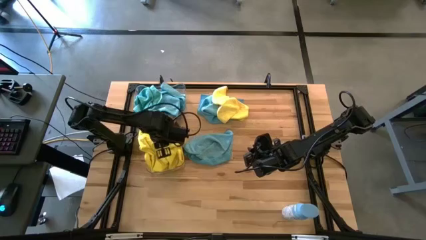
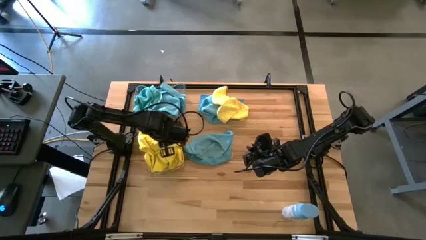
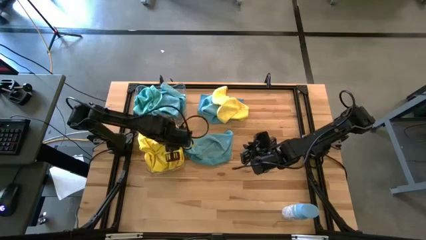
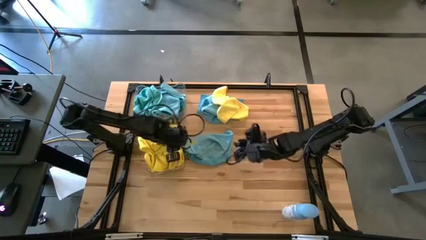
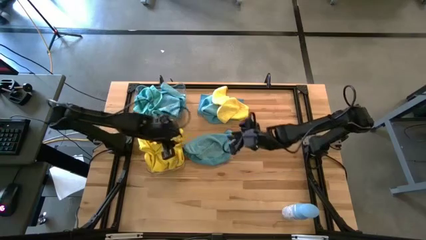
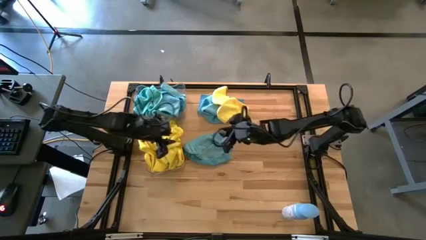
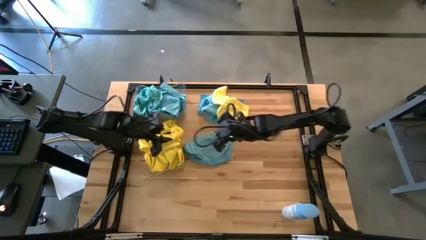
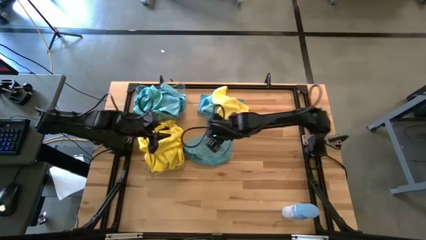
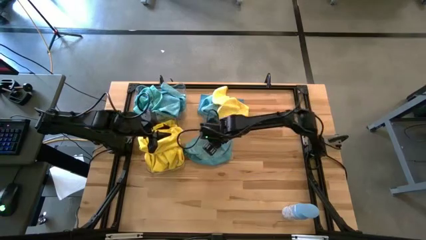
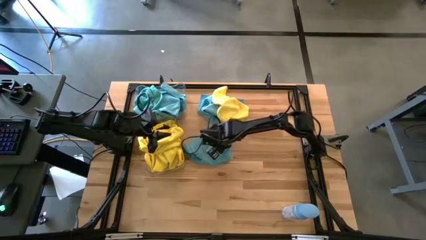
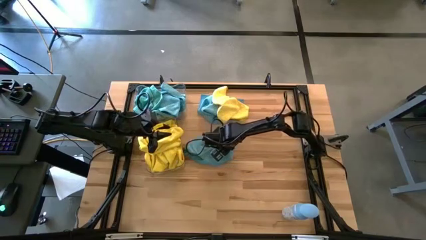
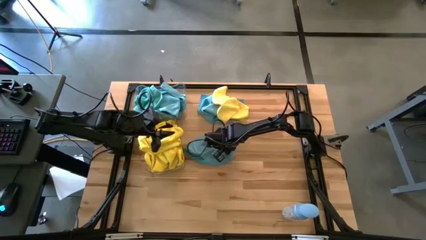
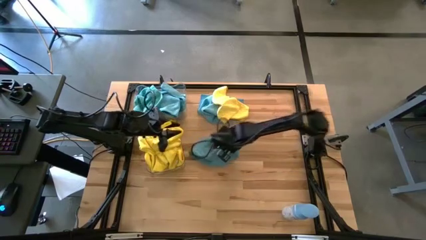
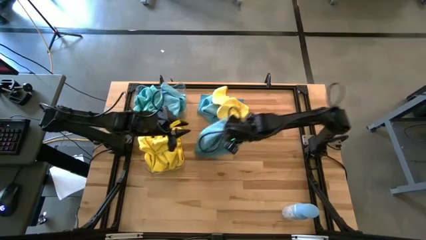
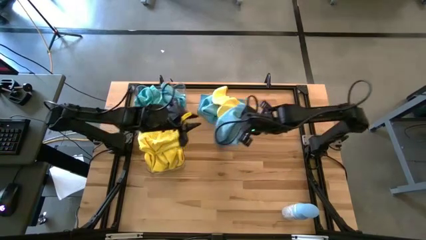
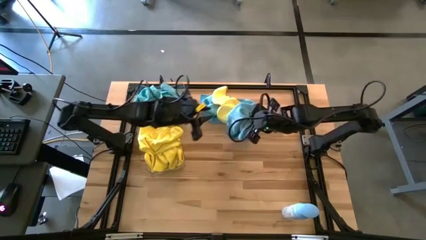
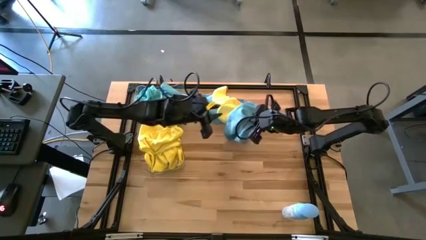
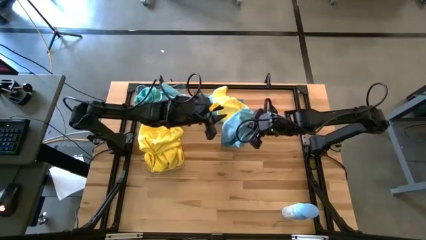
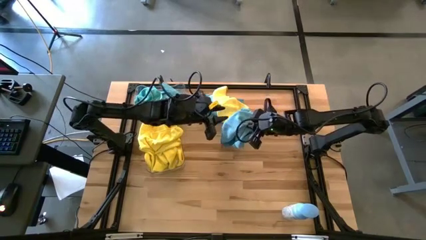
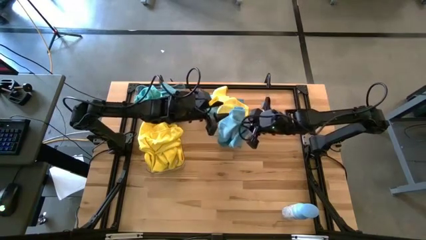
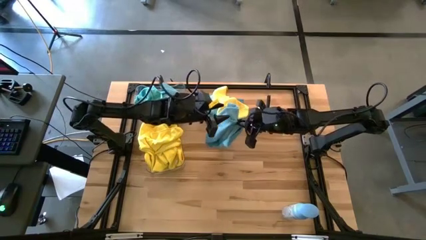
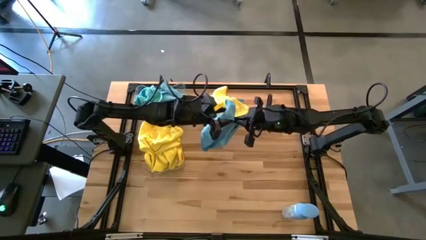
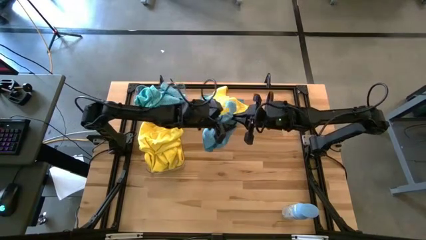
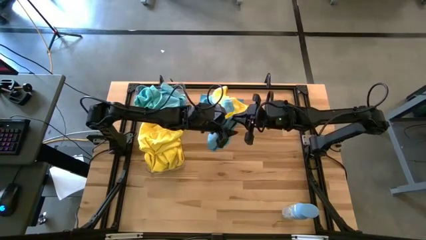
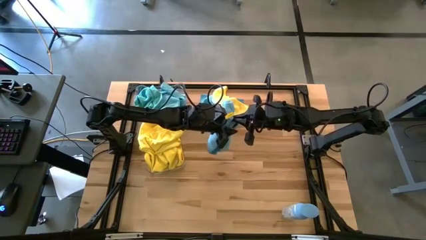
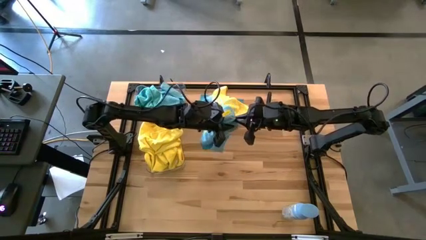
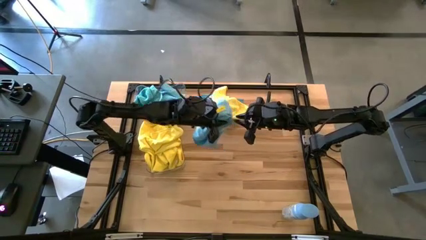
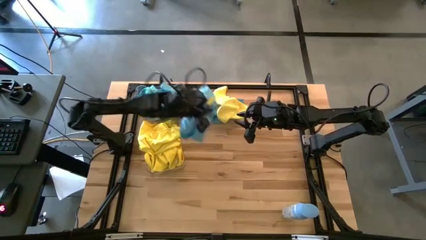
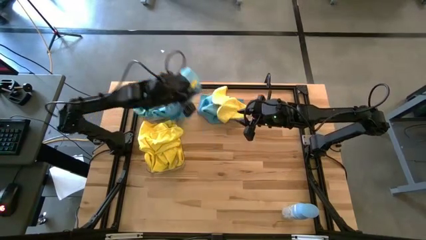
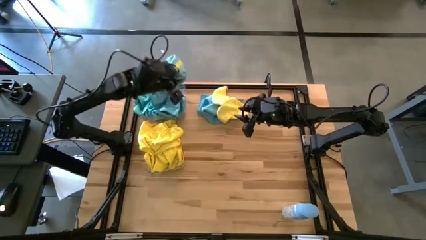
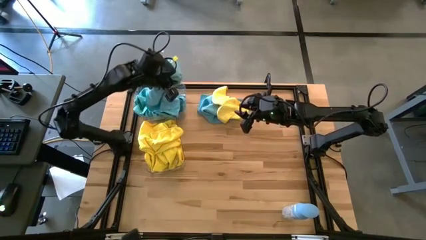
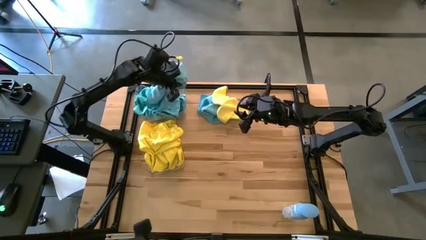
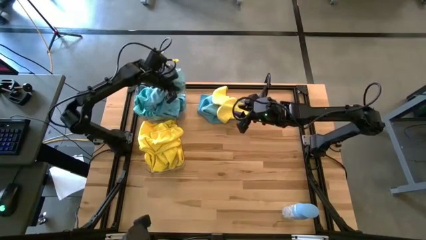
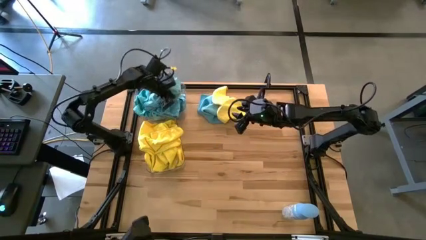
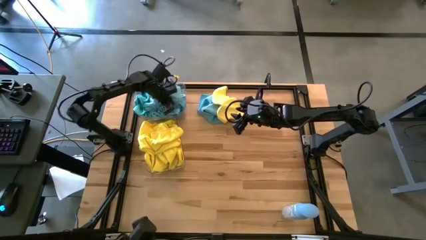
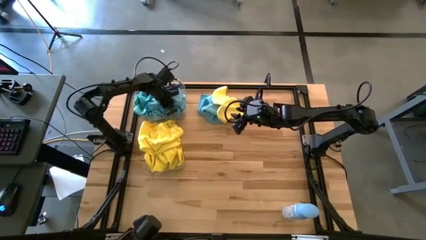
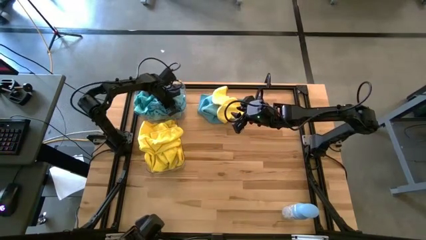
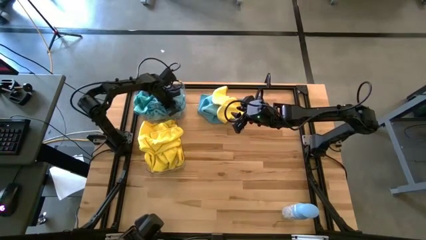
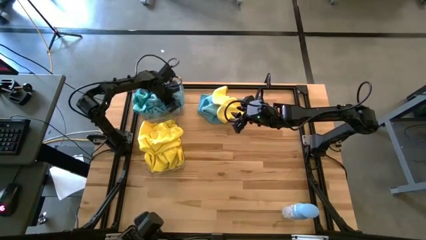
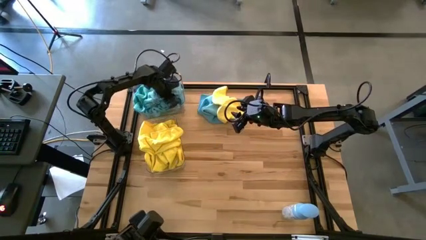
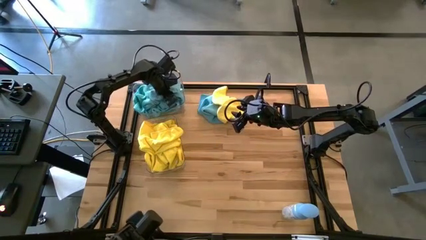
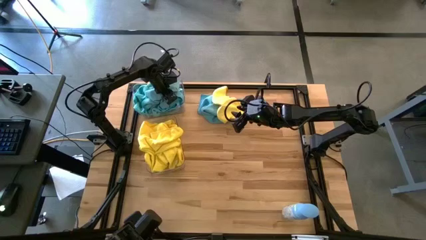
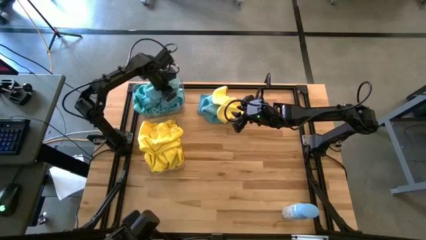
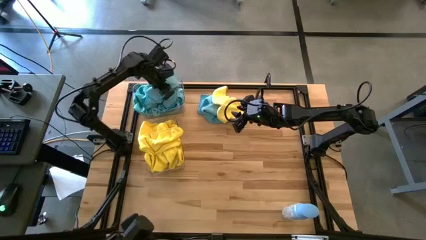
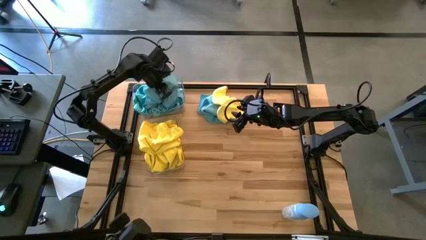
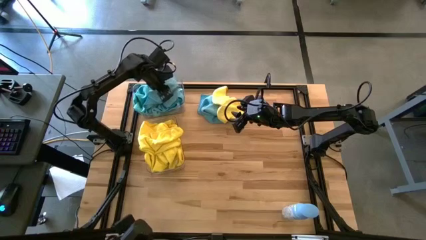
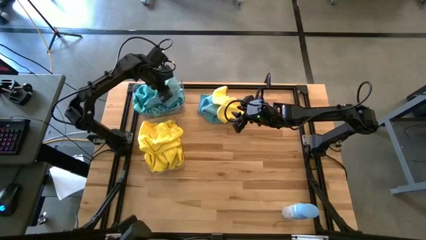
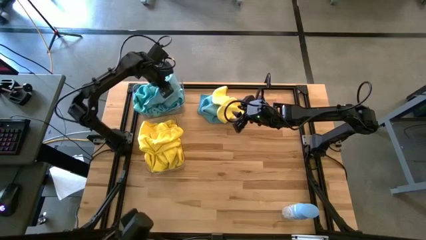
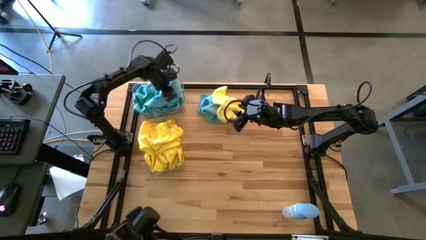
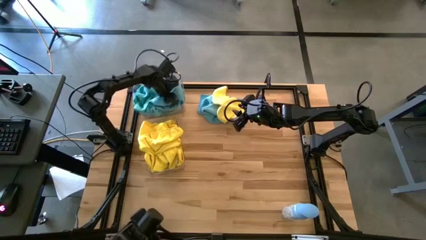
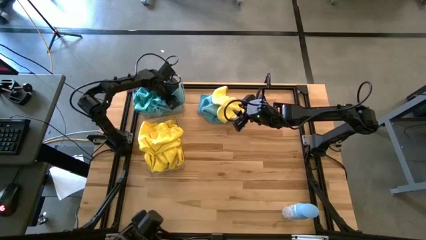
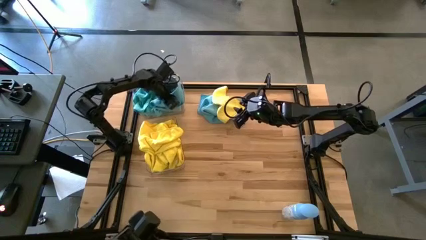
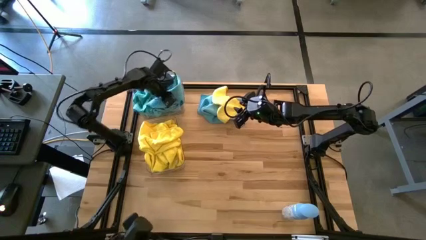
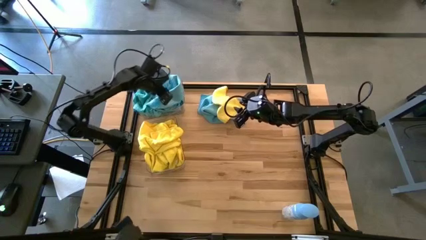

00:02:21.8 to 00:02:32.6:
Task: Sort microfiber towel by color & place in baskets
Put the blue microfiber cloth into the top transparent bin
